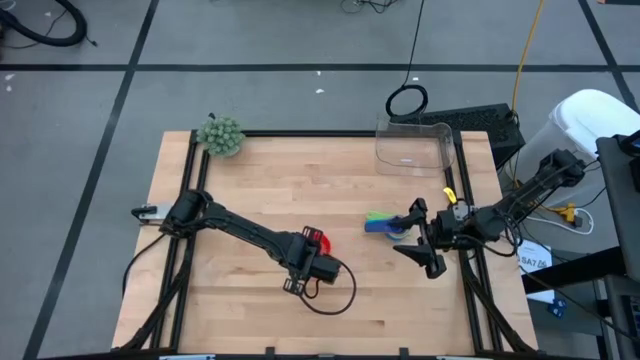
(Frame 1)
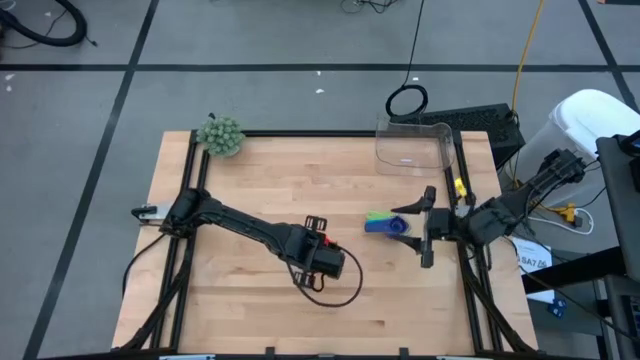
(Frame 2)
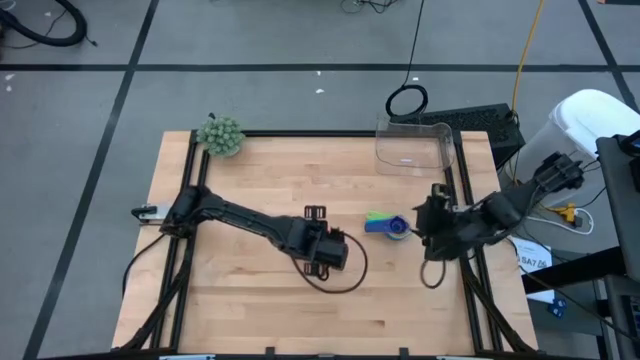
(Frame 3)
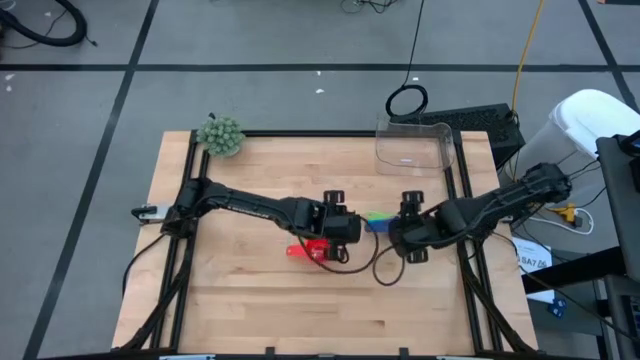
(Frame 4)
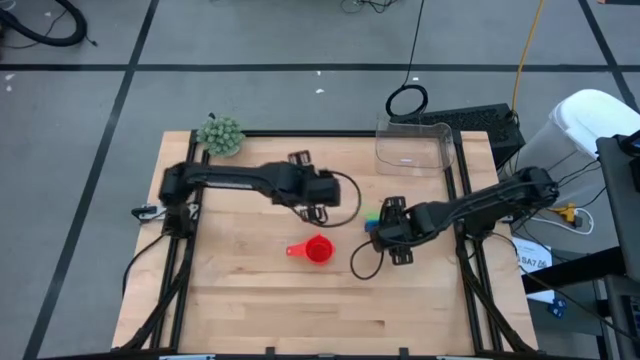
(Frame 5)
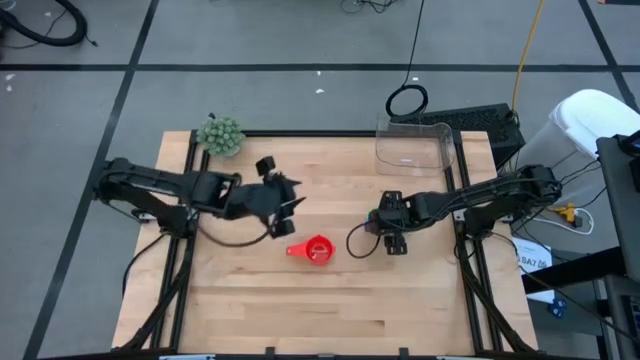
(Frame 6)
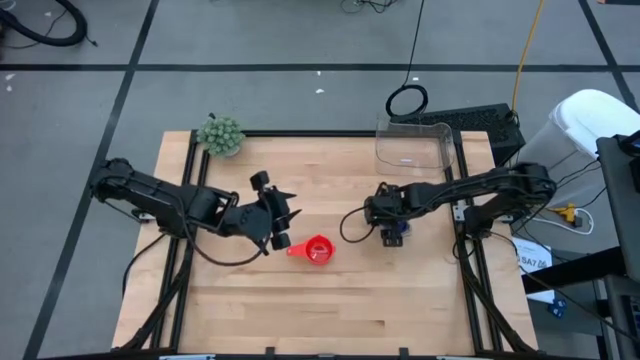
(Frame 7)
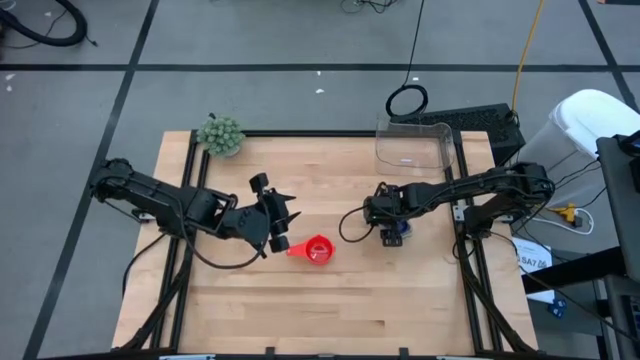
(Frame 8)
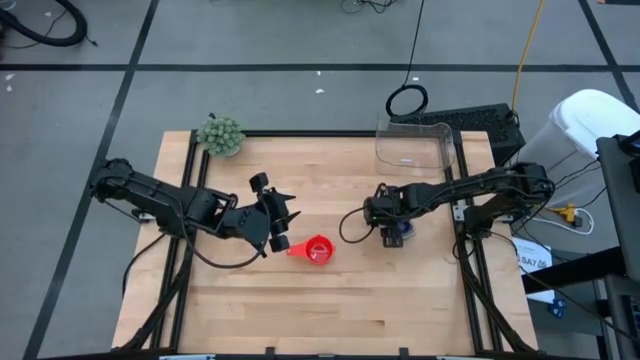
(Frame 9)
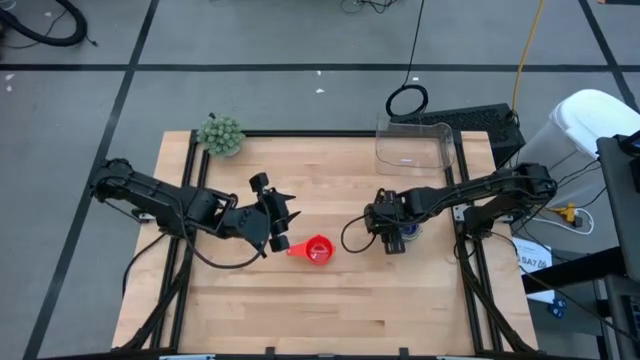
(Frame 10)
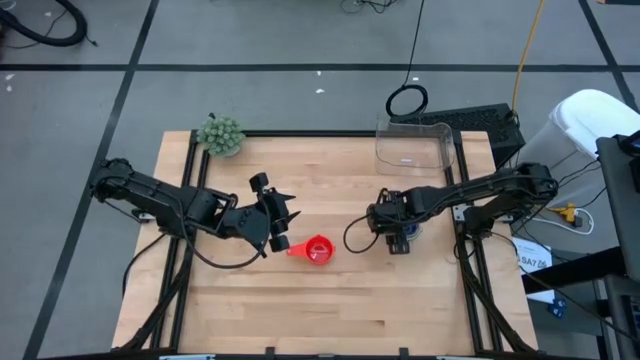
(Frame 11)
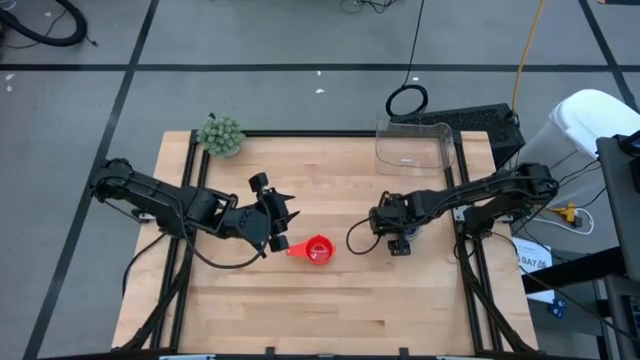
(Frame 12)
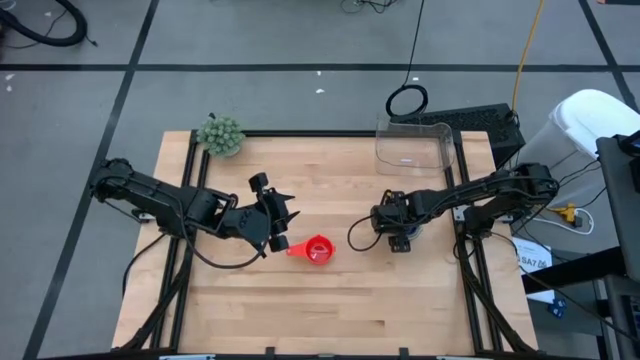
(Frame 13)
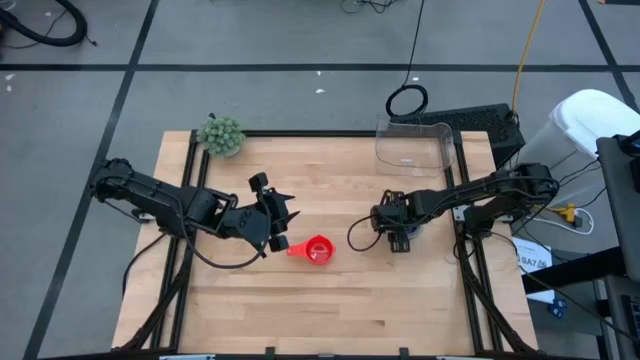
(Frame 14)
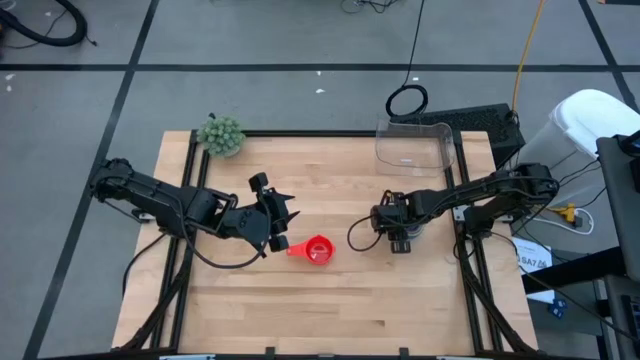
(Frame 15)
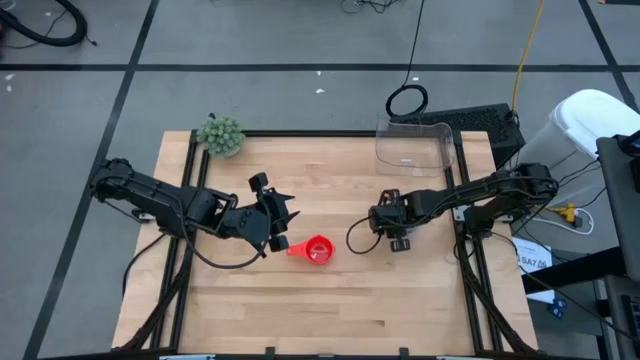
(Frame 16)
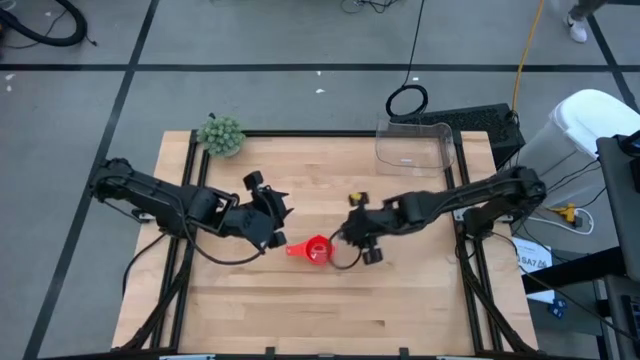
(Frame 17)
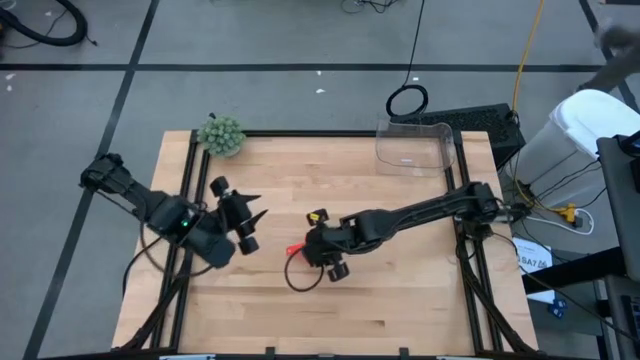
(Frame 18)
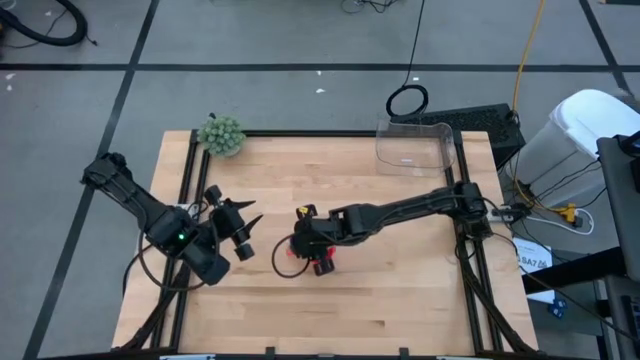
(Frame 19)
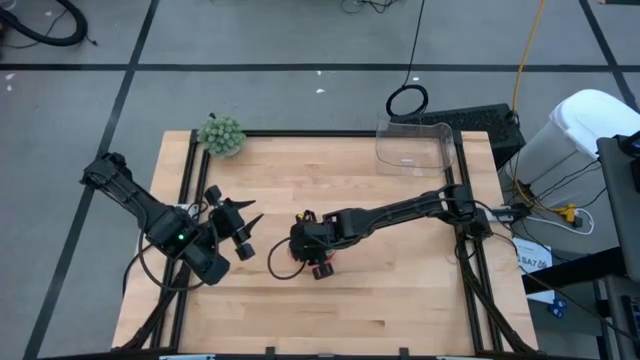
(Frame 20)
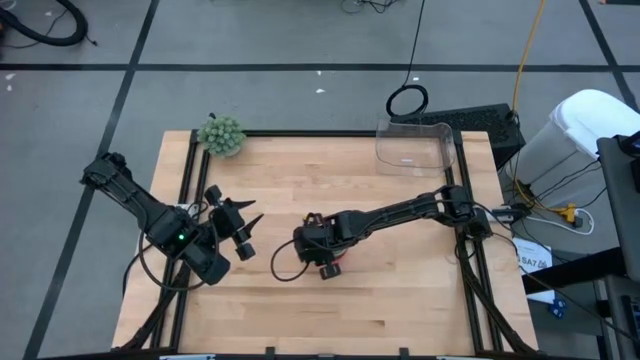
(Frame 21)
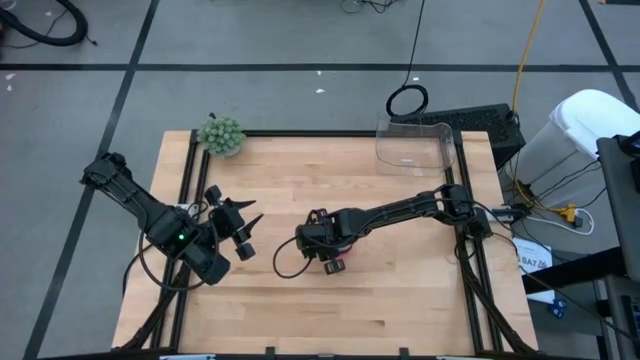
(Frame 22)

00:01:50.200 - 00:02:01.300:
Task: Nest measuring cups in basket
Stack the measuring cups on top of the orange measuring cup

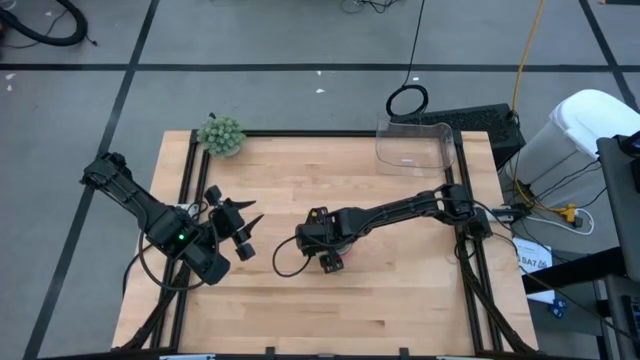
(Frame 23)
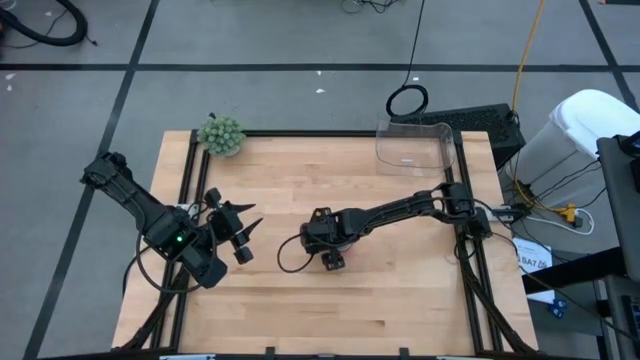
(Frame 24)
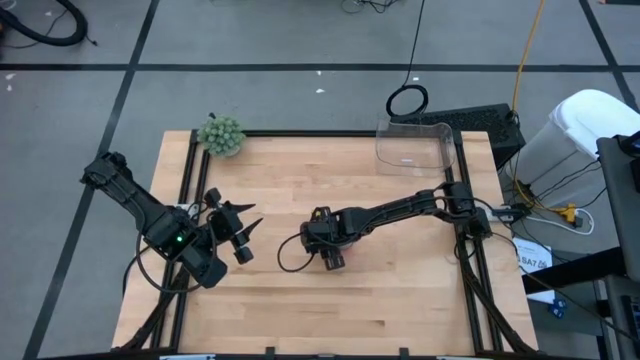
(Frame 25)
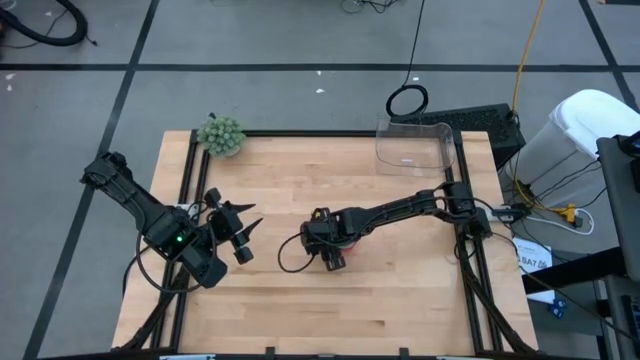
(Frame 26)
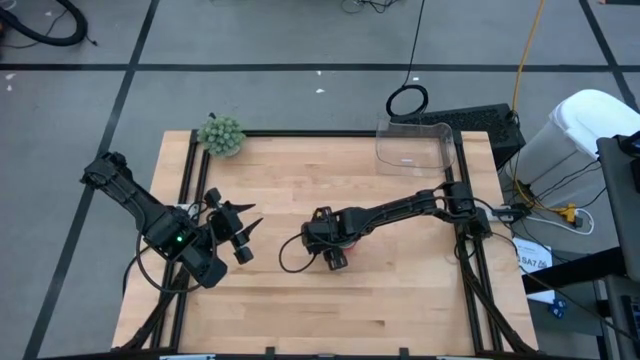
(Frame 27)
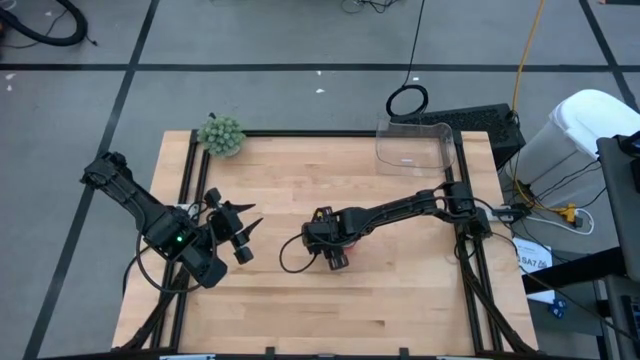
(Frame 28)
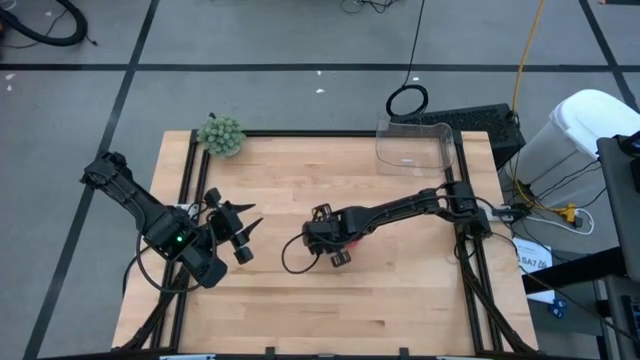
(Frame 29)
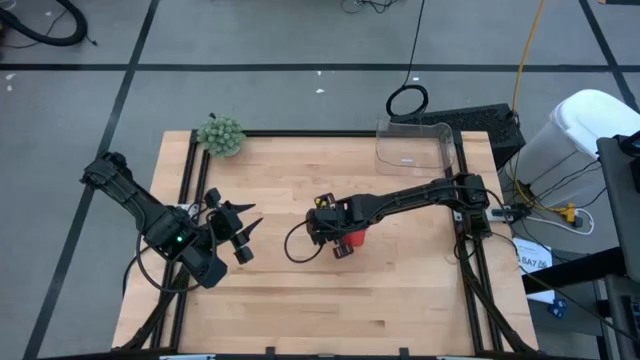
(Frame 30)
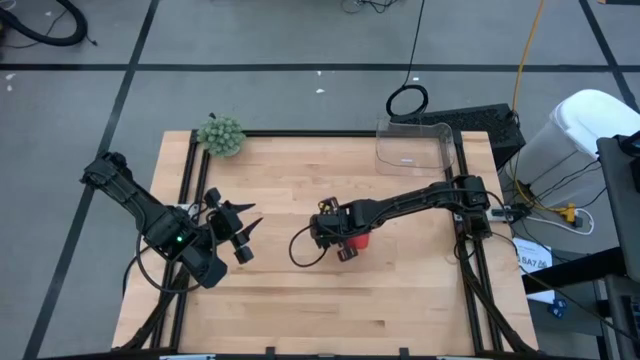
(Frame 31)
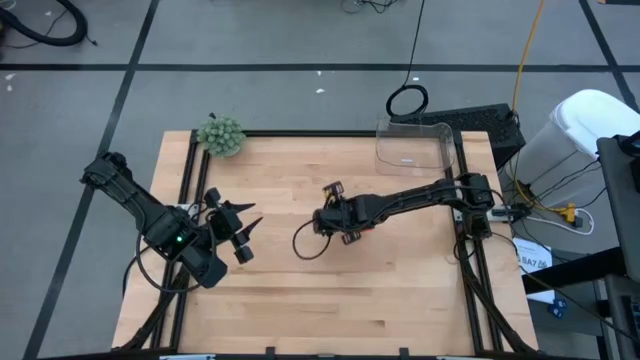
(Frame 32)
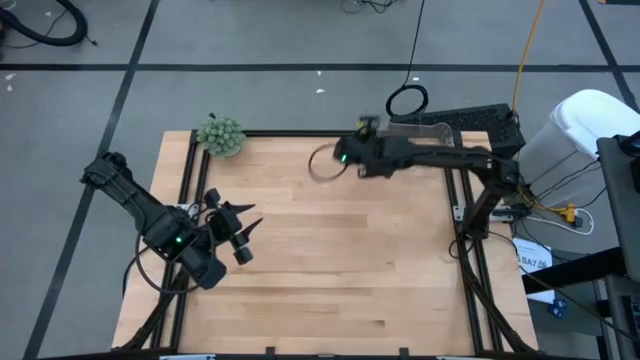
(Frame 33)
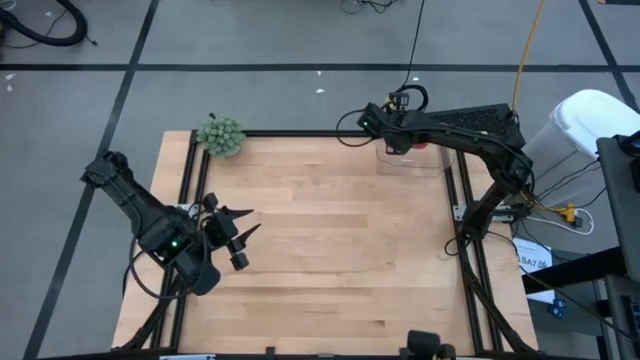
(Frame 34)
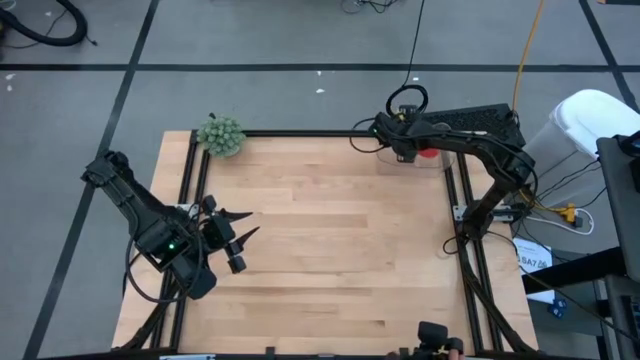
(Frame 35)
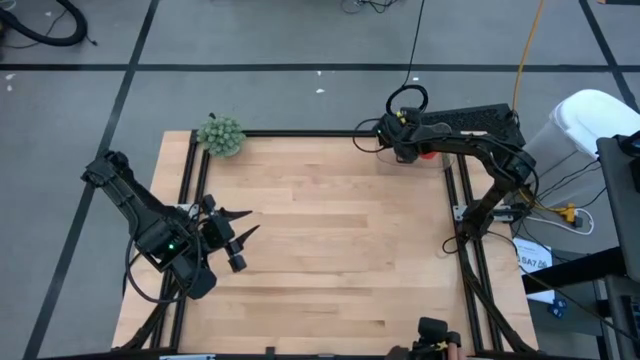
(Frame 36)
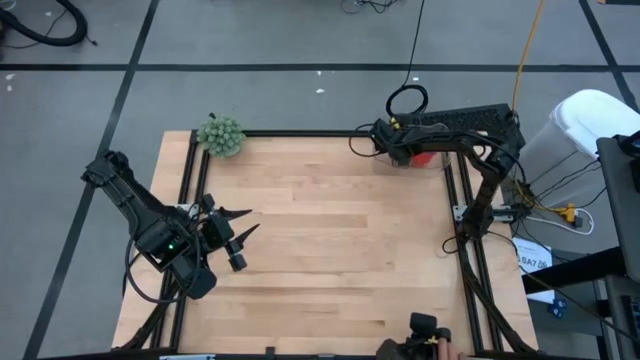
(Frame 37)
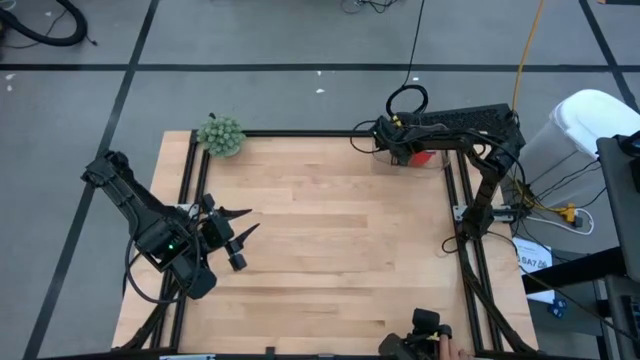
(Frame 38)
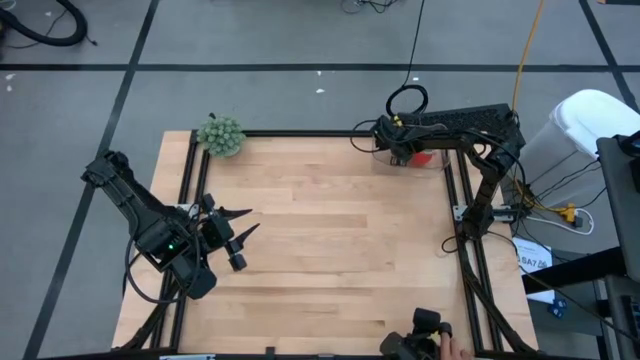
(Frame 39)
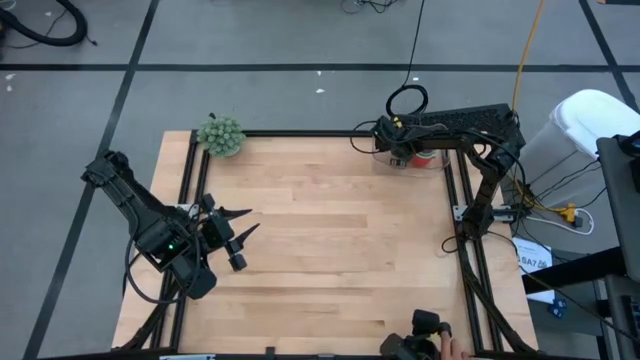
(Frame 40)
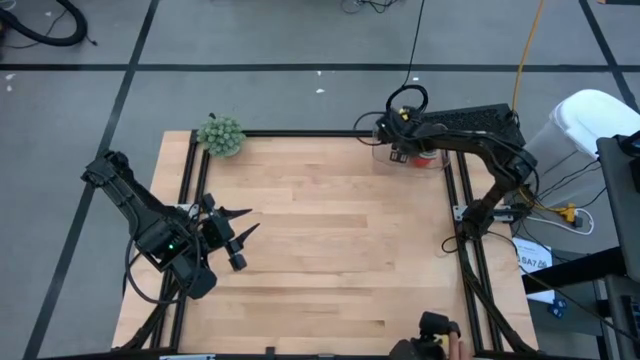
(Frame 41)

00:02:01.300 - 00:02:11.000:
Put the stack of measuring cups into the transparent bin

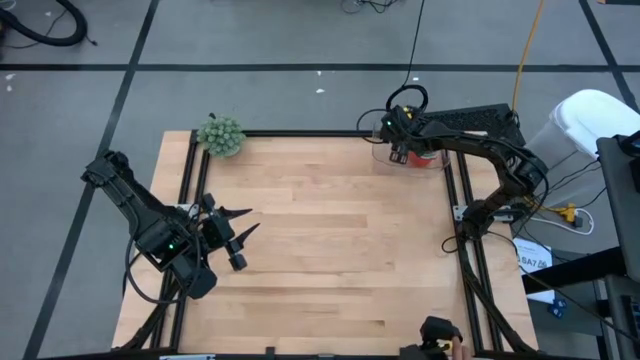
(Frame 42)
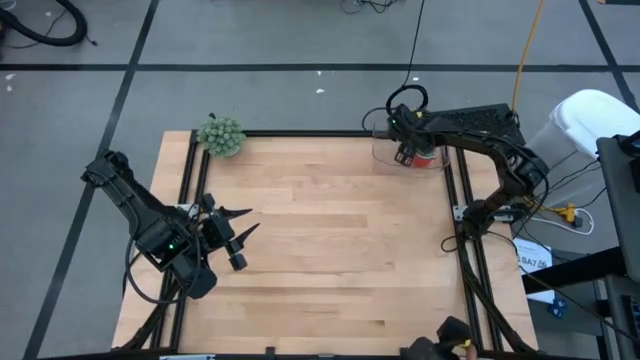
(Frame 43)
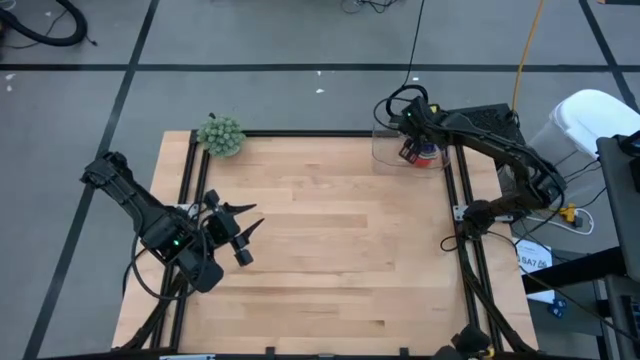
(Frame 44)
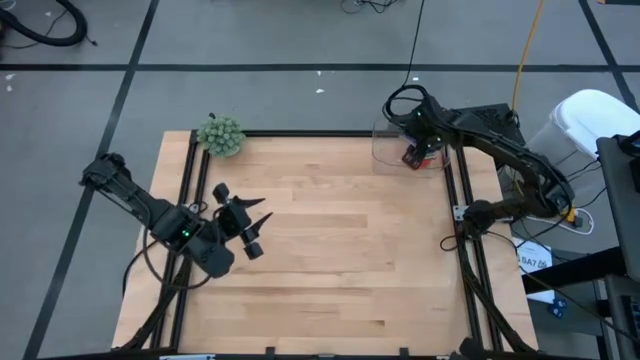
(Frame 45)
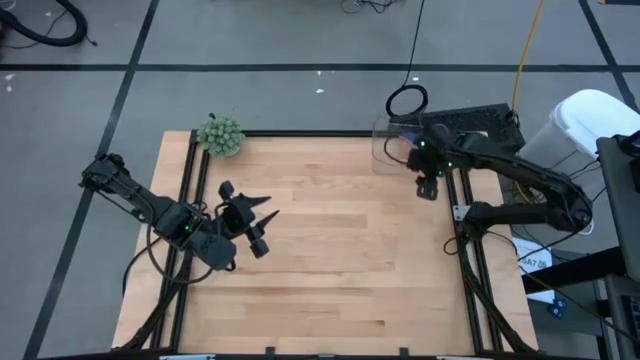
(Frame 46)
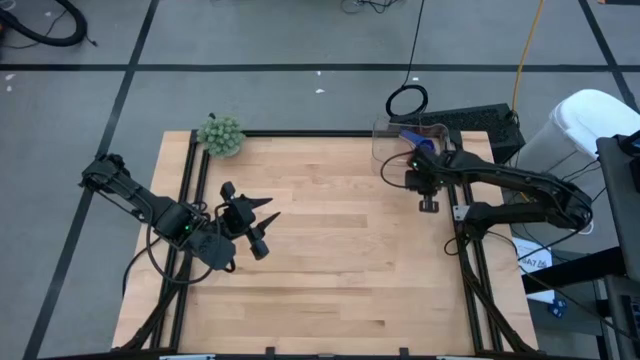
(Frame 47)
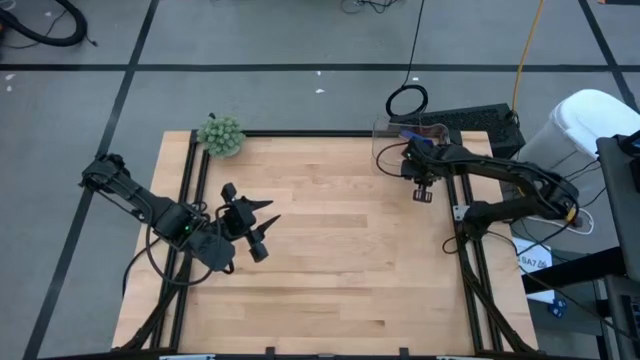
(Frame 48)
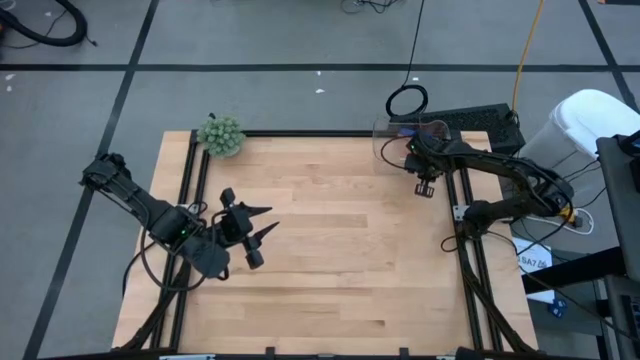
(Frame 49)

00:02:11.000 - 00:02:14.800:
Adjust the transparent bin
